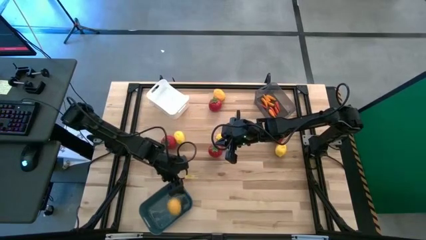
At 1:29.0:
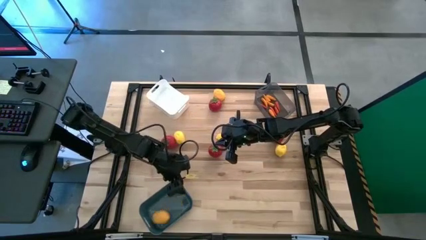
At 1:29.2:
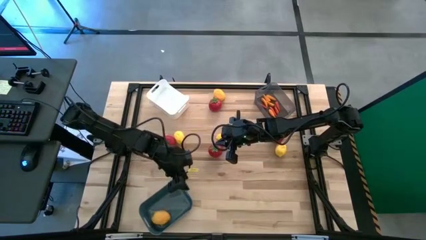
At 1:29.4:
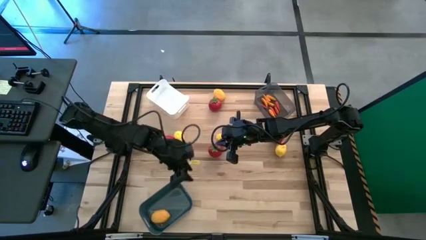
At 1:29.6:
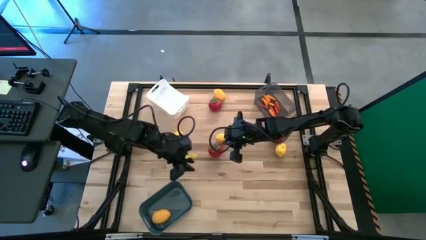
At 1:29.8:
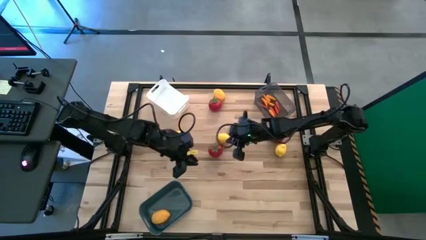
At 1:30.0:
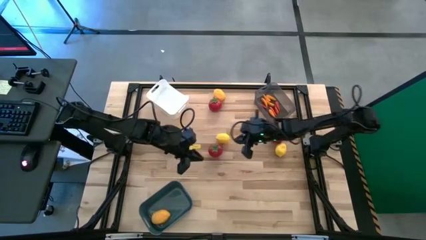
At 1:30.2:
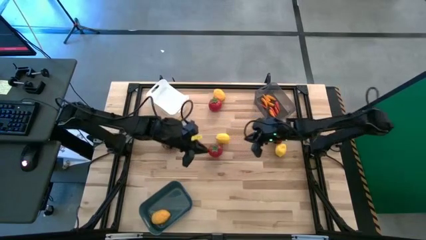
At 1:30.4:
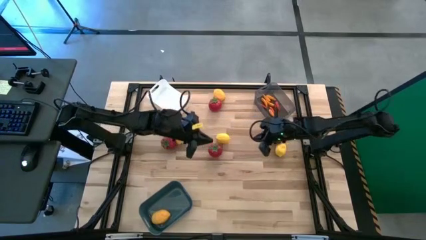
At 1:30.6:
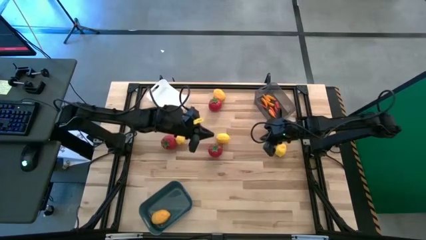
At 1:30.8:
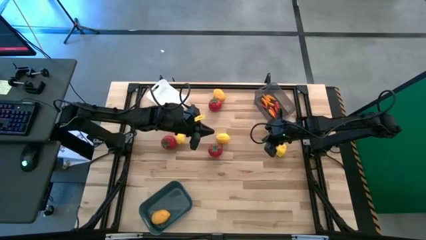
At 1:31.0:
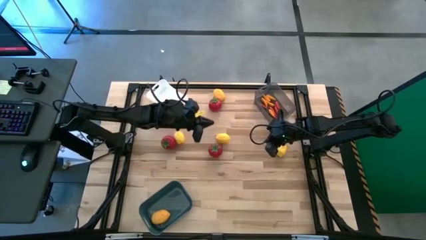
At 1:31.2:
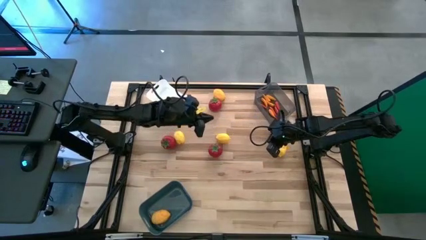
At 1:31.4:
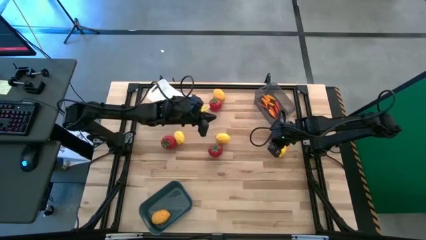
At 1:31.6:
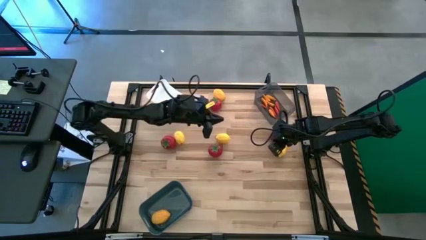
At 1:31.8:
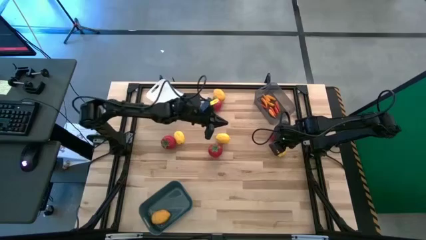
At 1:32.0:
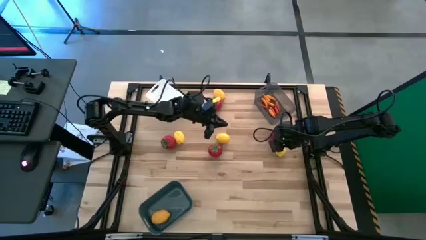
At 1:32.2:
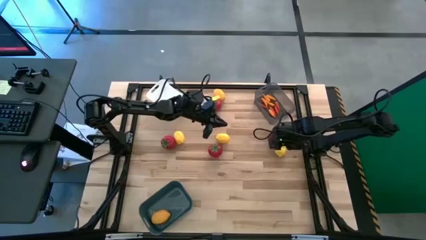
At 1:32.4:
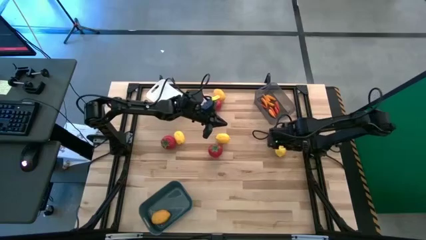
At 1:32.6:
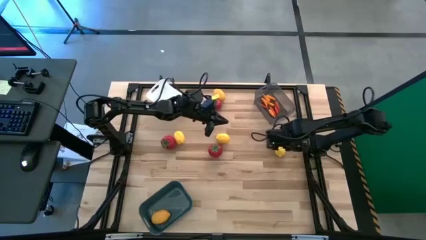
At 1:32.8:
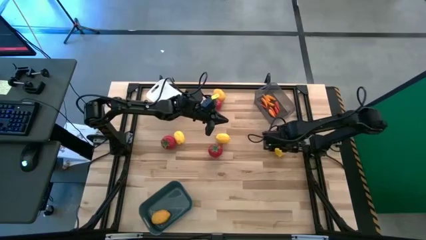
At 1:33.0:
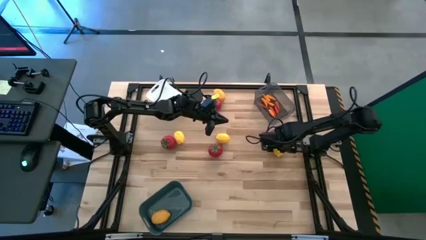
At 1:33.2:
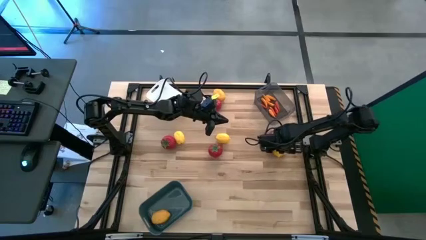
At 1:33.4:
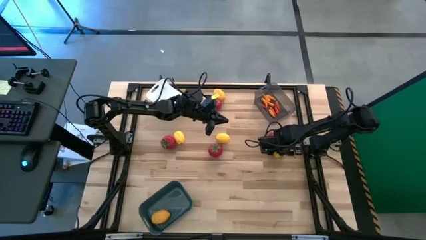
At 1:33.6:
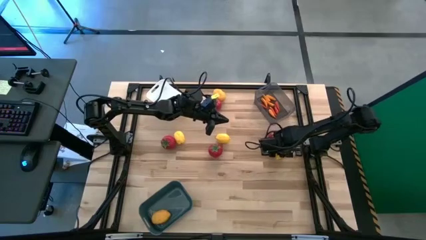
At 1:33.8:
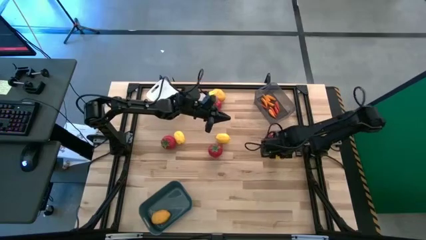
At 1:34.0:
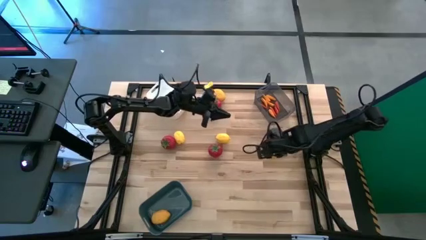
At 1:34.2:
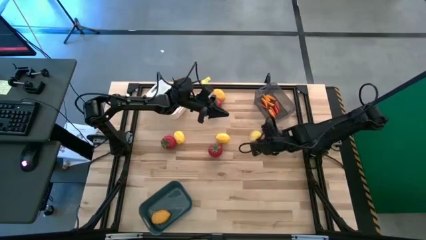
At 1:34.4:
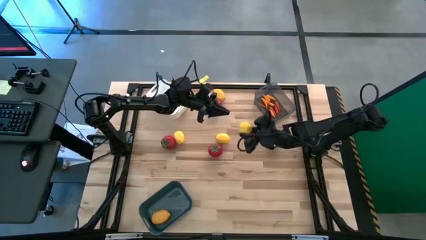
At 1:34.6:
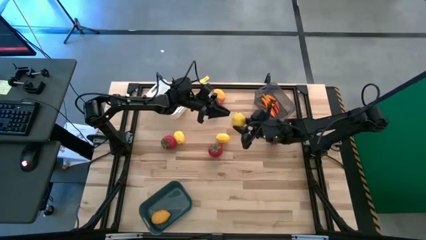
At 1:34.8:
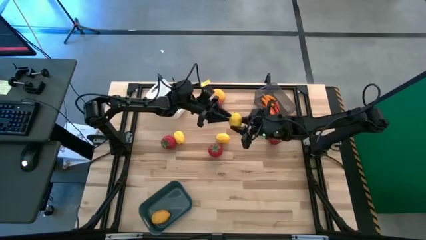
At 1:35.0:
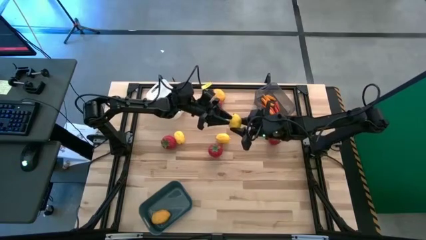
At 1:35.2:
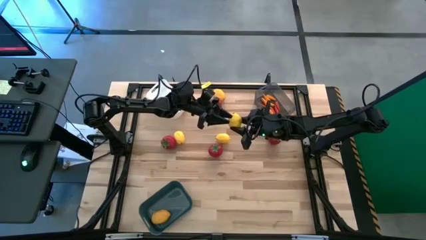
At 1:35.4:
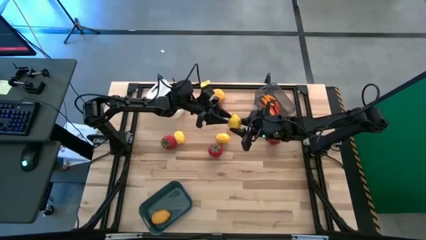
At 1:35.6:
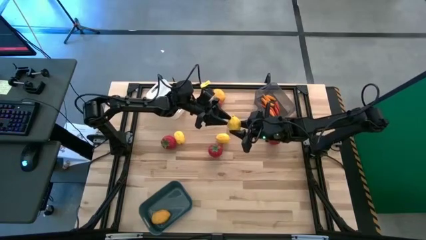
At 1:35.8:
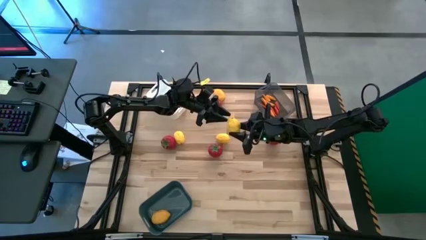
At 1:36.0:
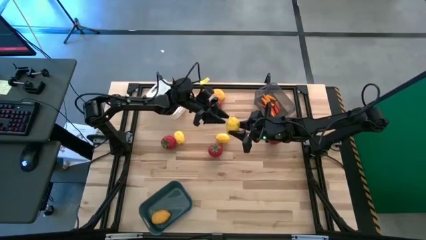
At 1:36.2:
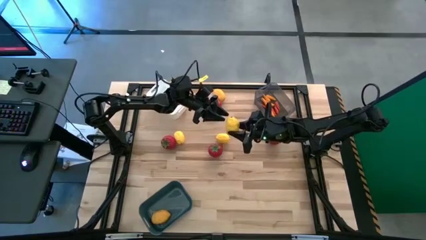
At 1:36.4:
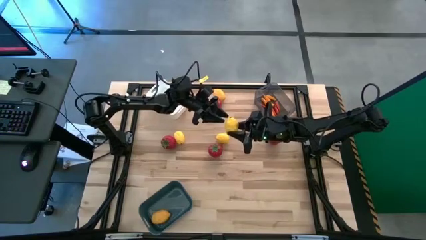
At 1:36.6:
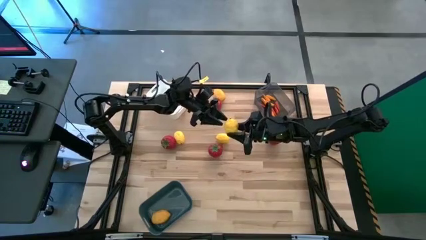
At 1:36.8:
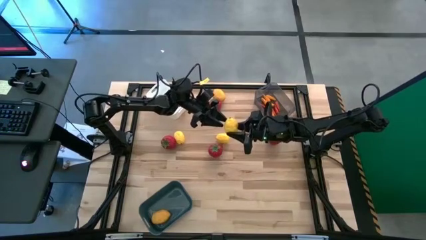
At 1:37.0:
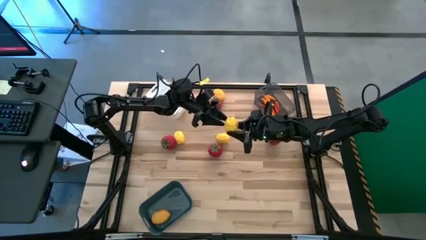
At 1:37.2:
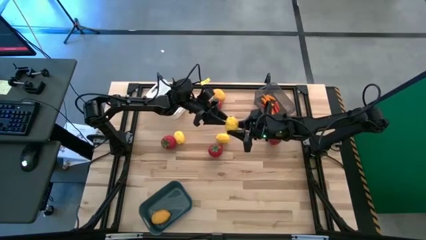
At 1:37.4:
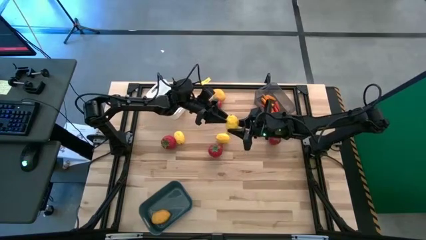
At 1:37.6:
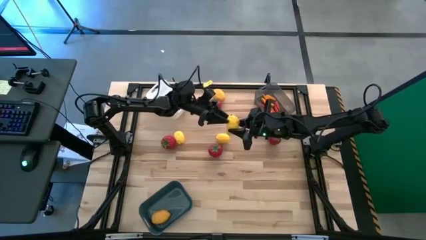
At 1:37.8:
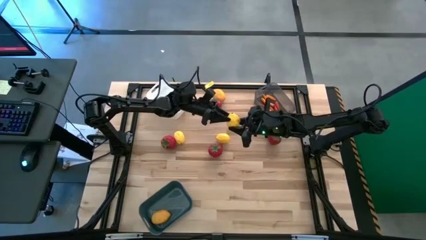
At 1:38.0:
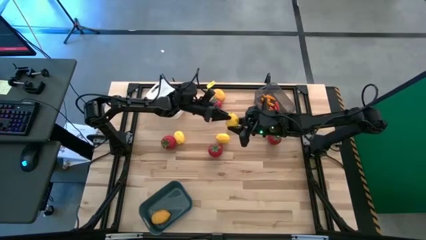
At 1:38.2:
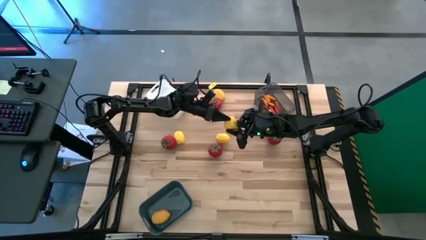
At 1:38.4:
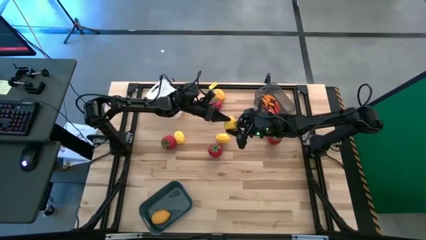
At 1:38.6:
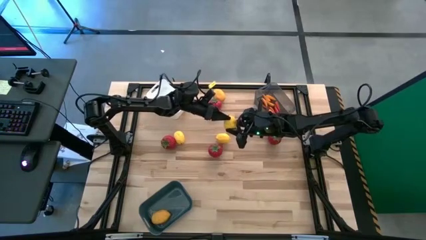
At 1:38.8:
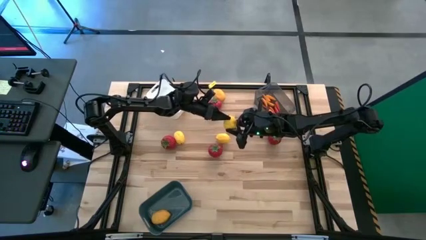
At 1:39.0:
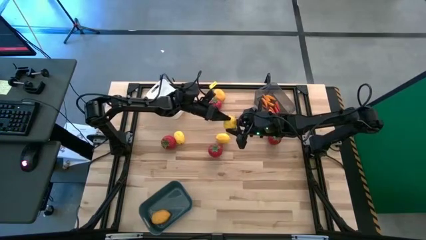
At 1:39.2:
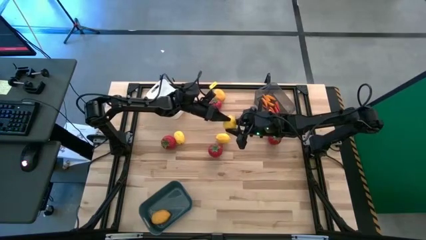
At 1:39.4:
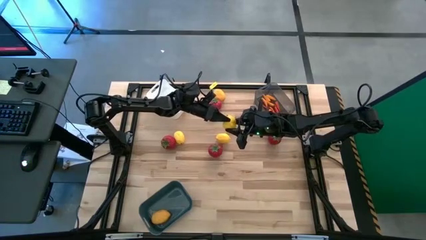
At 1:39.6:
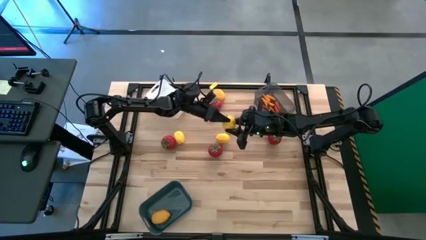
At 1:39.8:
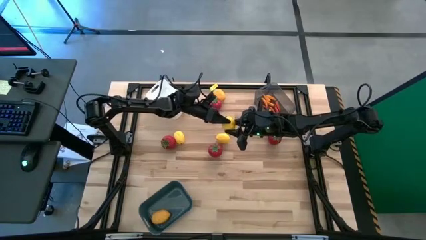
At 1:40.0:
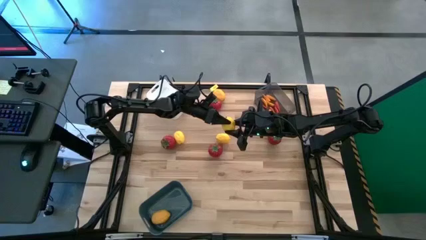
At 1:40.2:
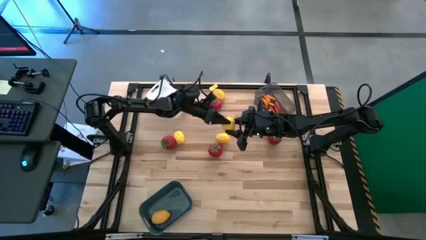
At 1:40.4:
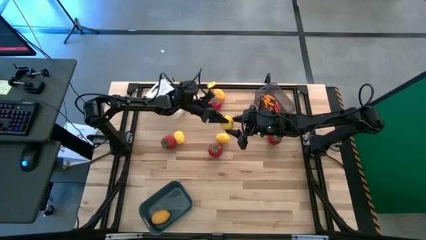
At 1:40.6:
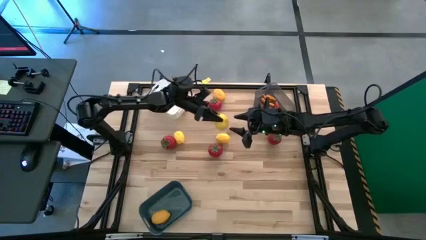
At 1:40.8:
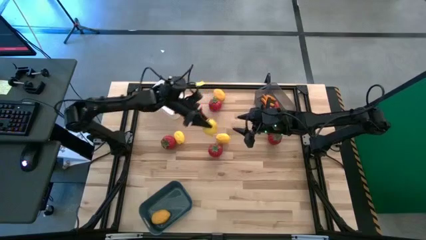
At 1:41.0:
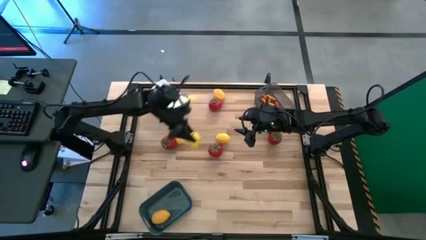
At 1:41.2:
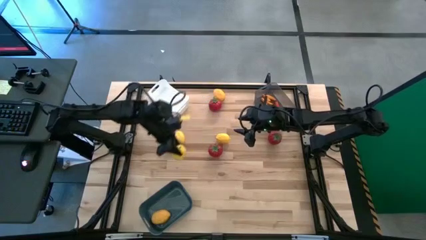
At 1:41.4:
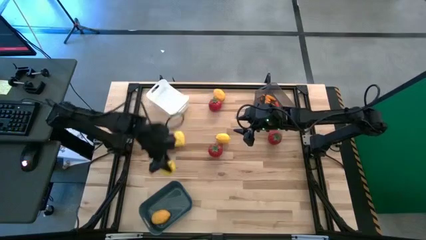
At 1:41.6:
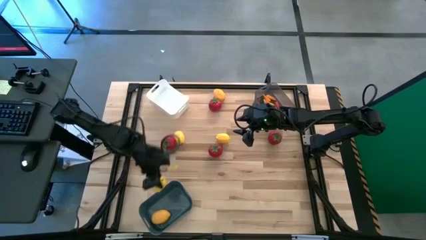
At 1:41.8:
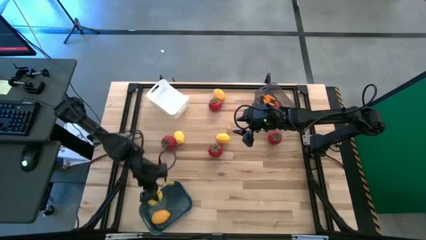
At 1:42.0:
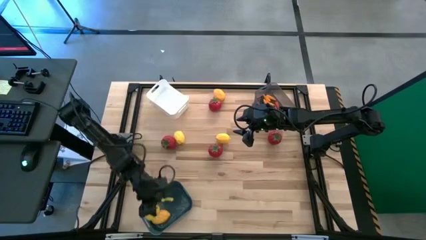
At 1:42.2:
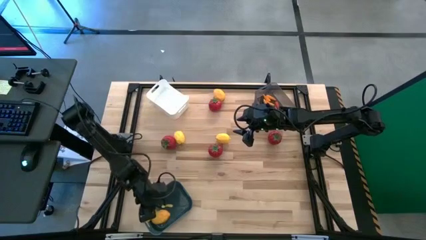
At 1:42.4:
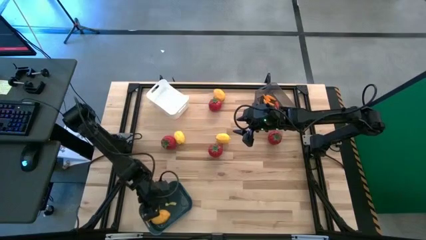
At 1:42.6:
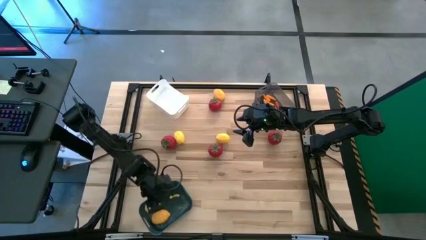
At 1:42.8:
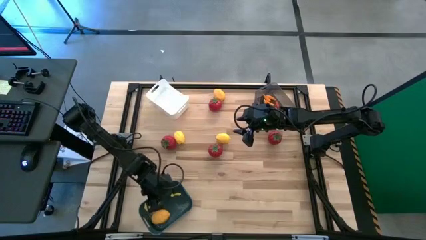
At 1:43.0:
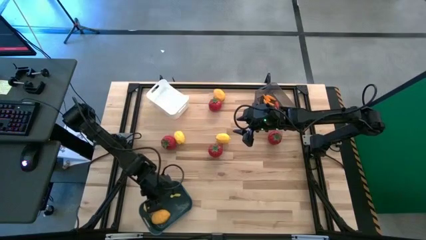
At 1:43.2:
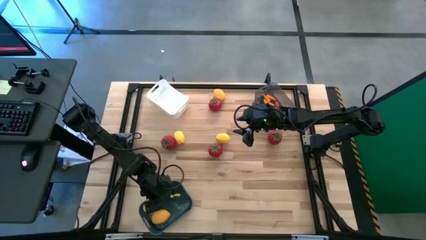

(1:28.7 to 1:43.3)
Task: Sort produce into baskets
Put the lemon into the blue bin
